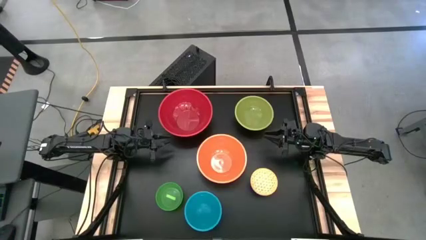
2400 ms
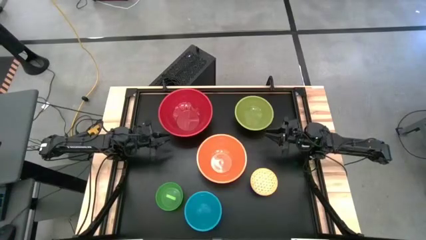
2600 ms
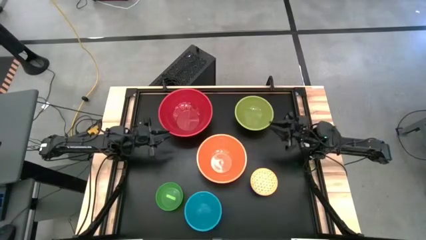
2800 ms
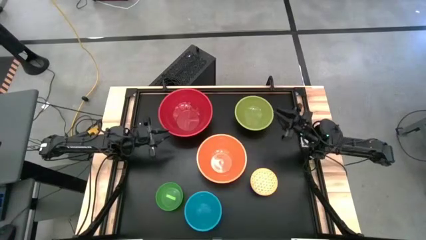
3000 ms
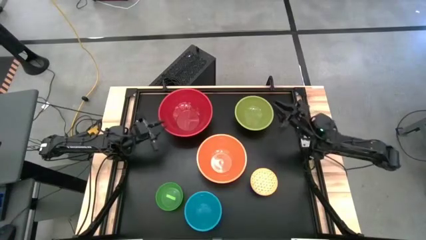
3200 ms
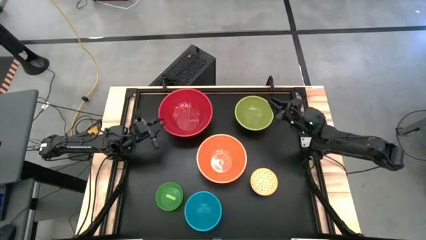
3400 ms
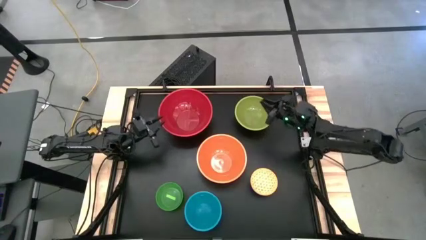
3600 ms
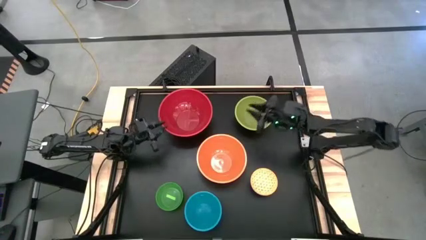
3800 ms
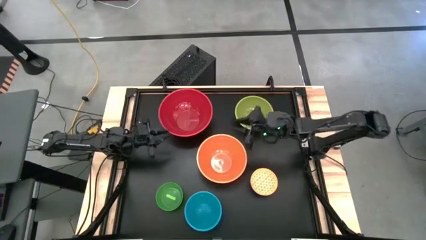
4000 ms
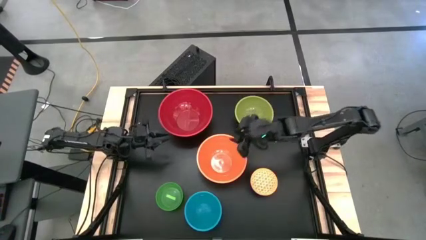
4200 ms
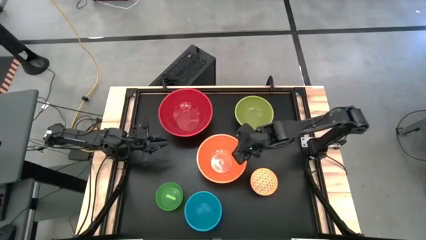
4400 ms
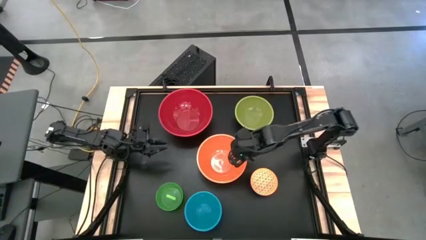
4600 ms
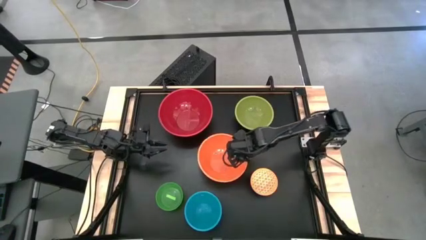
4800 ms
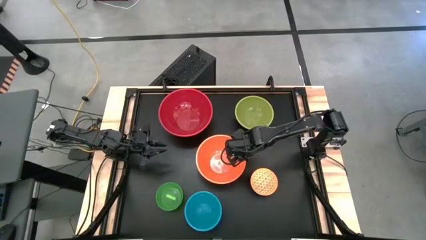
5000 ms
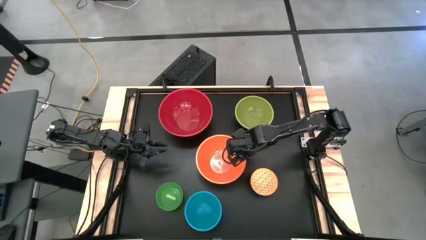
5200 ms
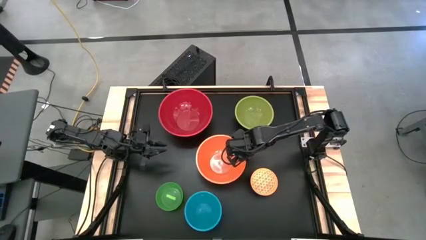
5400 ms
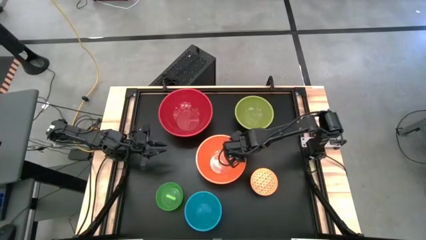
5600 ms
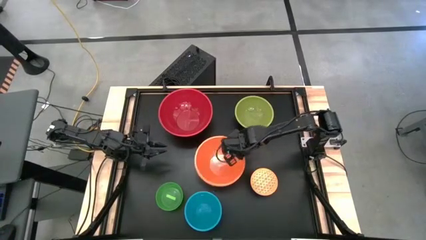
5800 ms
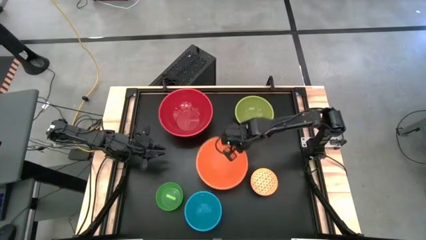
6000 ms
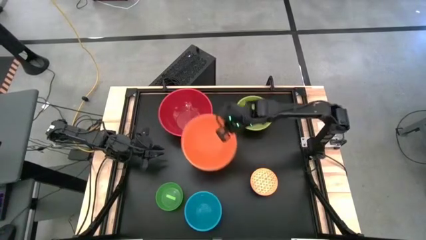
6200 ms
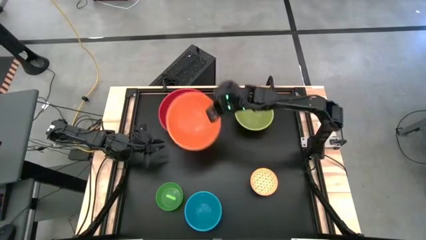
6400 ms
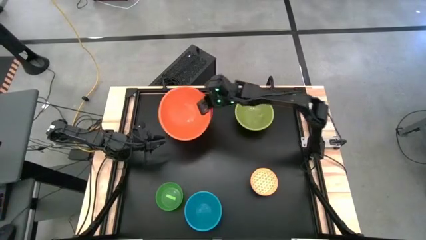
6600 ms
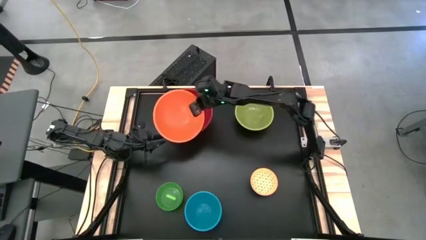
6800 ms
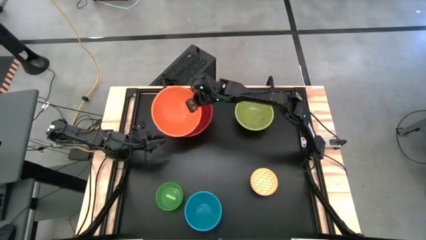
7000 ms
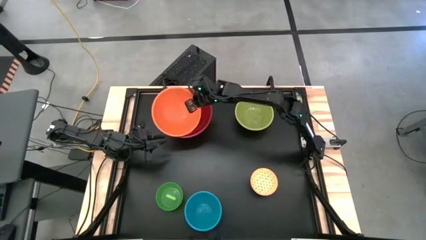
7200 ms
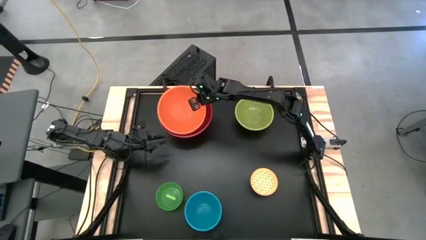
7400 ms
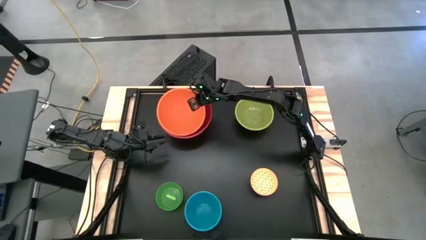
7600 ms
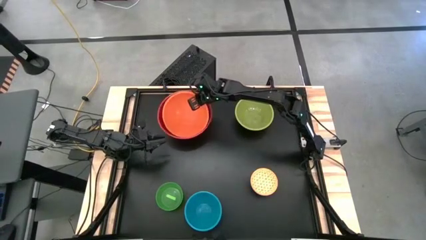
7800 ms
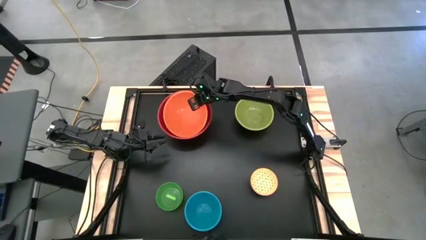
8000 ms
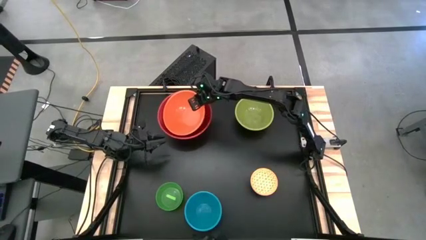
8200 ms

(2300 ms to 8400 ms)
Stack the orange bowl on top of the red bowl

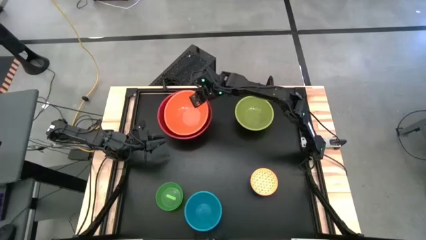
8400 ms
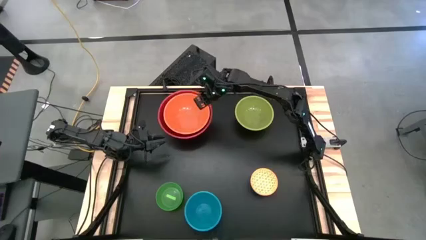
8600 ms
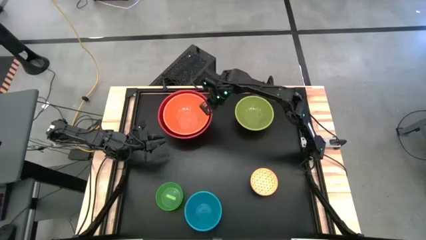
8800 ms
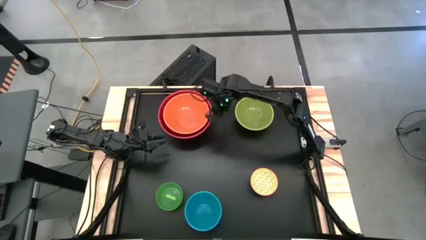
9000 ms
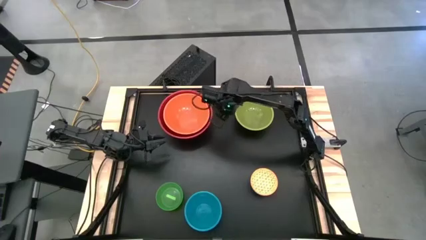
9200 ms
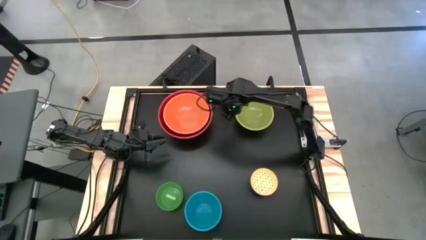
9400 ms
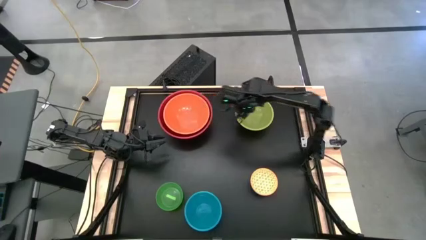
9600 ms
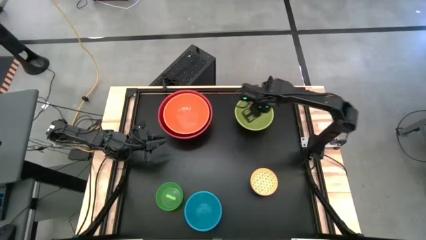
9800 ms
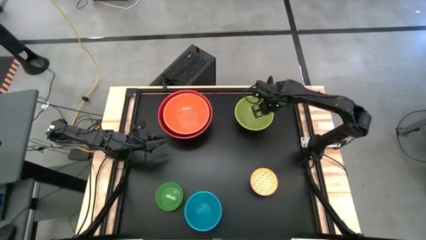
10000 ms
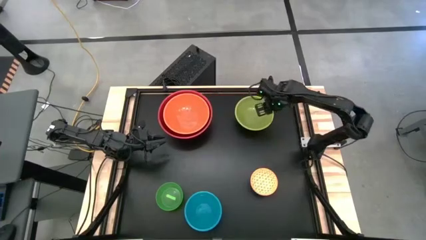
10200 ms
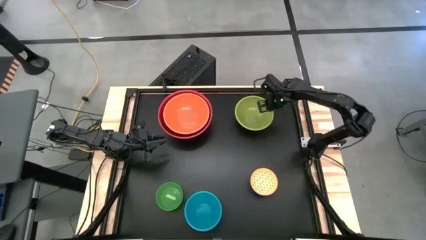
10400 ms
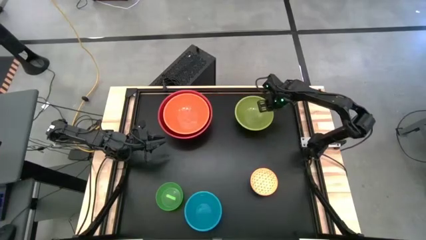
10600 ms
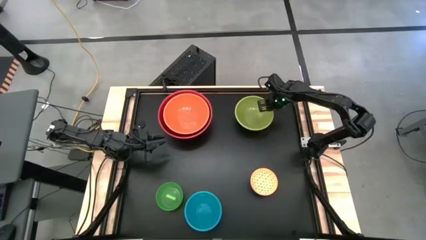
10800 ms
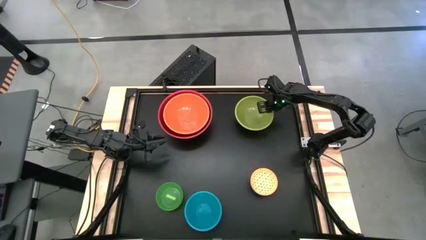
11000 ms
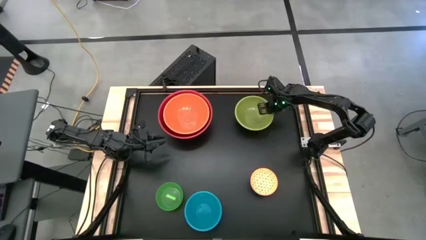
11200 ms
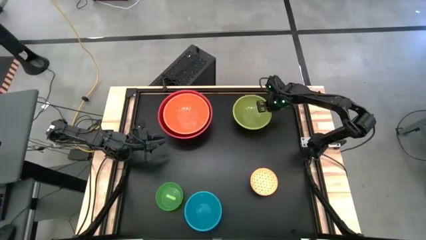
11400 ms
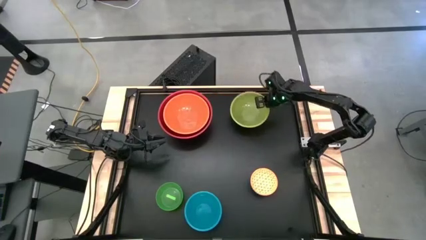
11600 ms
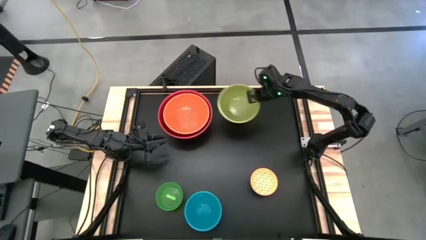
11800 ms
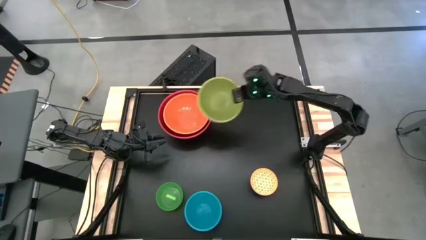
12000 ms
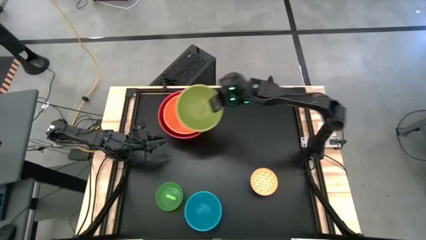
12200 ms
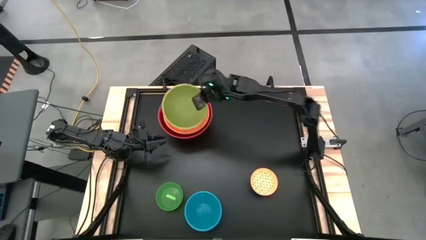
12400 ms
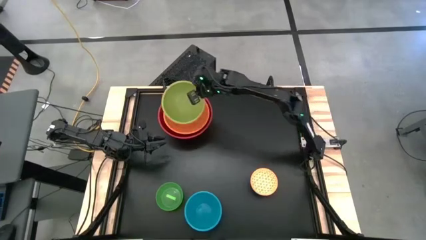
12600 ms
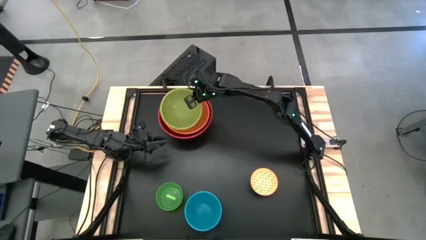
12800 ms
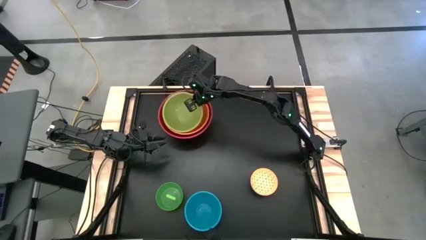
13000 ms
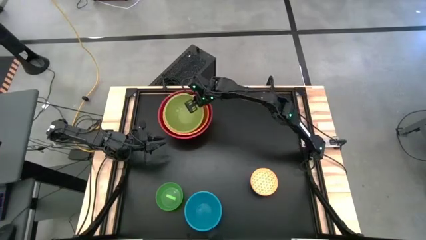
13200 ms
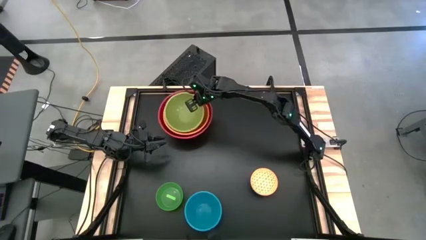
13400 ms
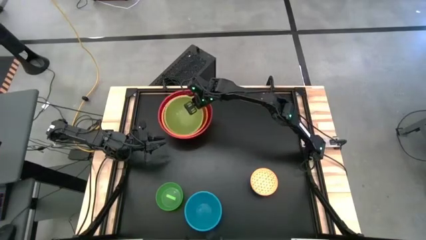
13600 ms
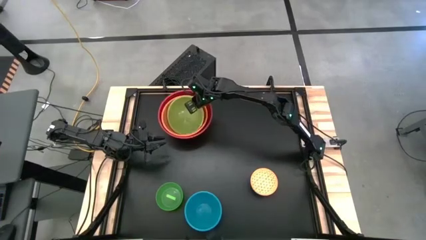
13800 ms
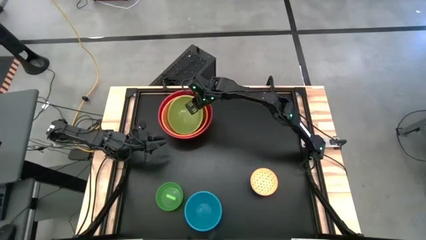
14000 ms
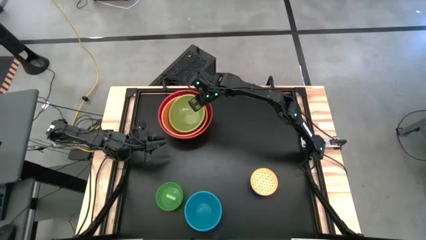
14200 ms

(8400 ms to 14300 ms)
Stack the light green bowl on top of the orange bowl

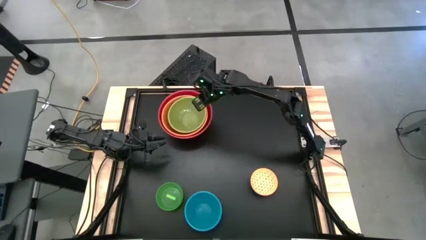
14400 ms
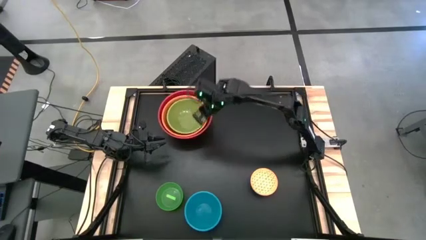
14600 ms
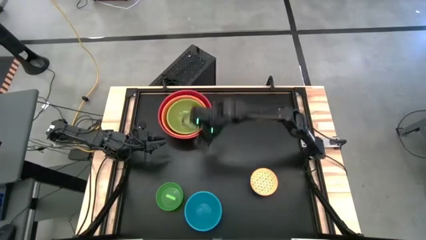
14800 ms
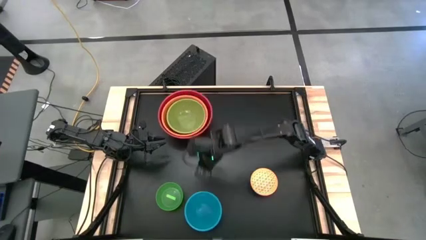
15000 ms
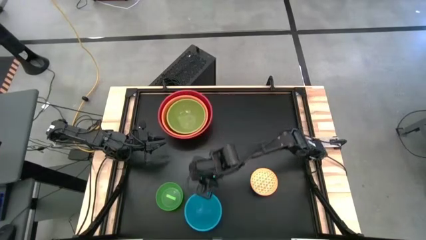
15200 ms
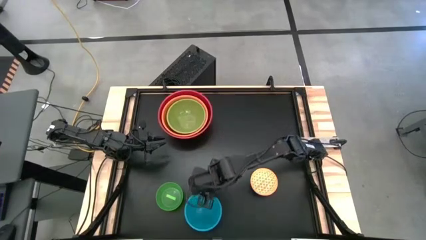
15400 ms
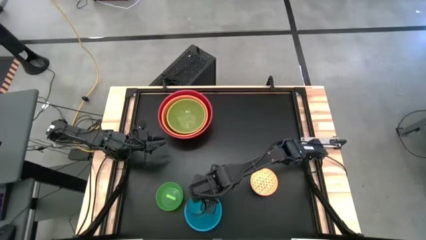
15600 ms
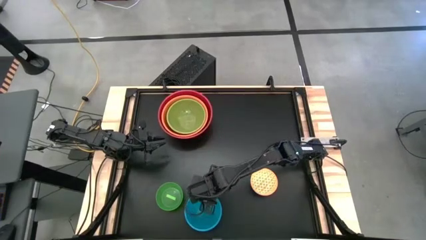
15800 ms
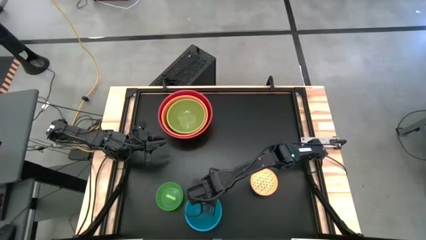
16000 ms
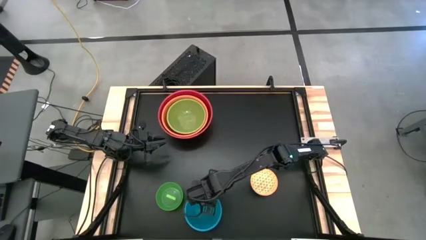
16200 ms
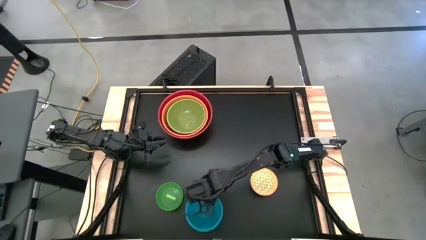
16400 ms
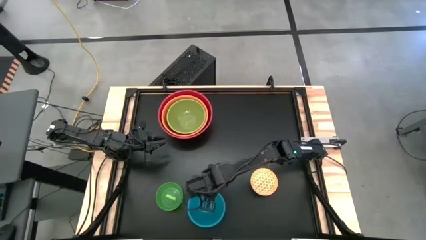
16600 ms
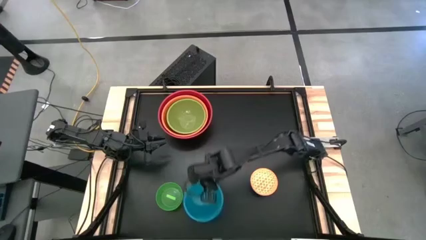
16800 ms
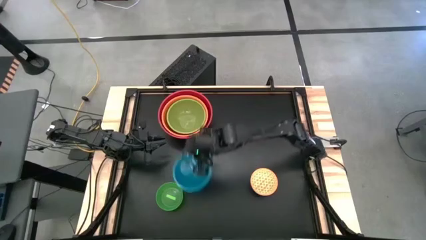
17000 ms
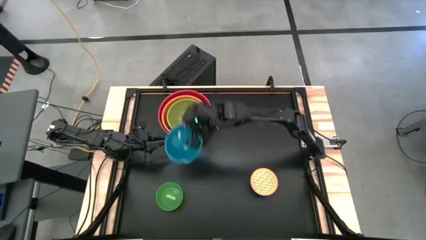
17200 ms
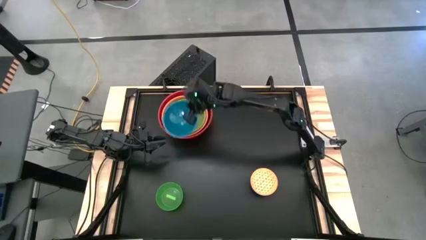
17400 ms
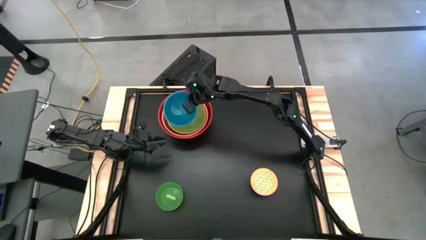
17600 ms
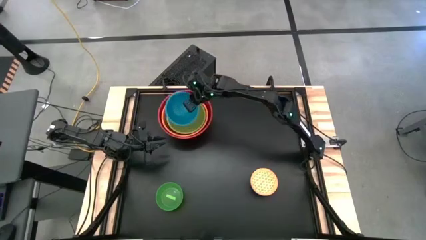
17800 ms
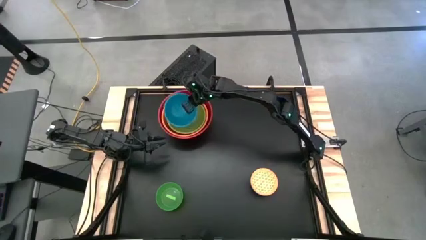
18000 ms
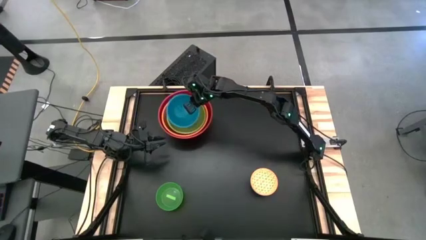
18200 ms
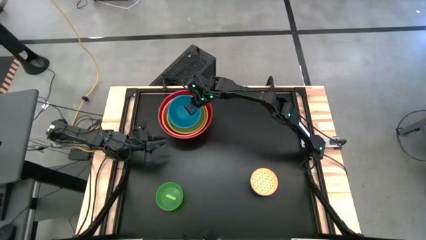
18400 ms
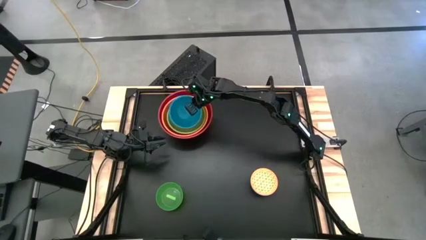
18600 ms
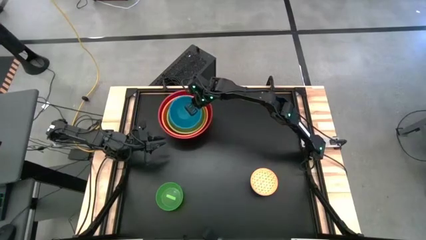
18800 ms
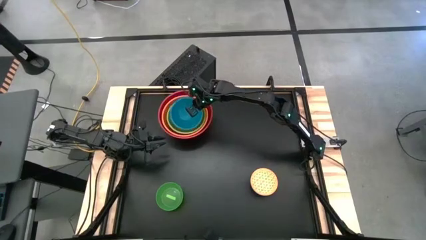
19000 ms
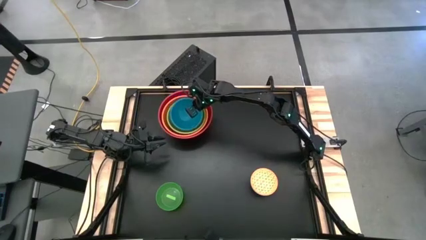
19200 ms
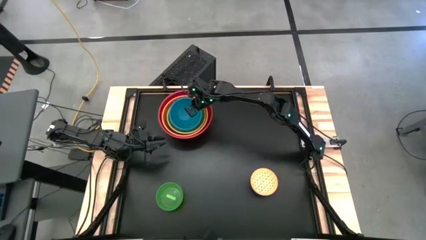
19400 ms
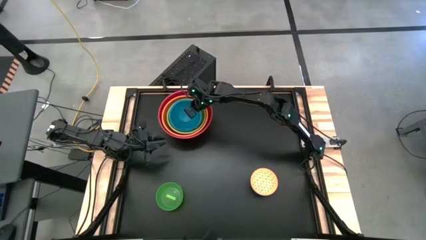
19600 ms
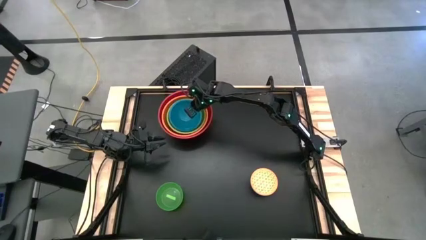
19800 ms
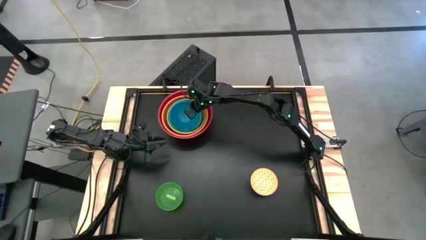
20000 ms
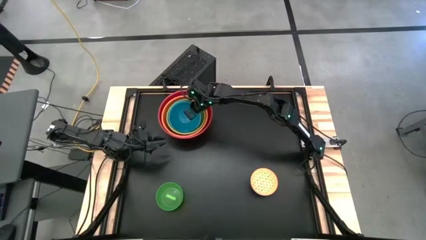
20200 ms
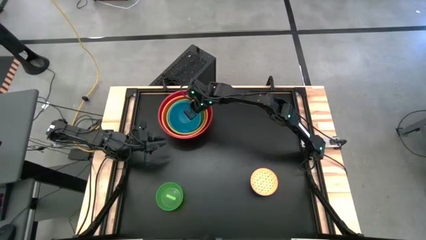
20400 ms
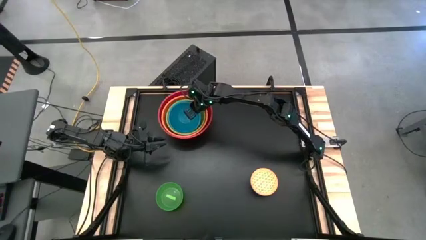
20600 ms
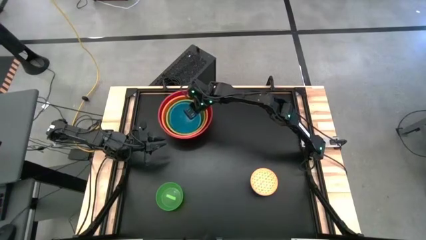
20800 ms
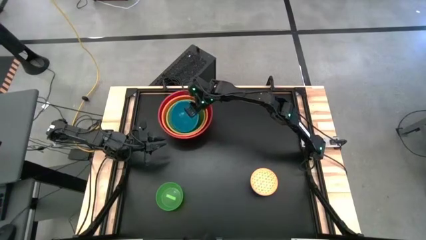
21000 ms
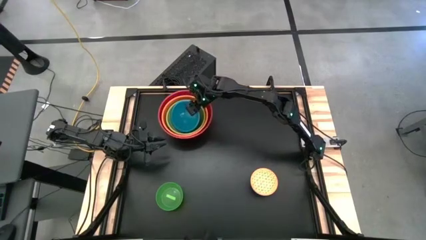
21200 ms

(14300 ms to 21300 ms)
Stack the blue bowl on top of the light green bowl
